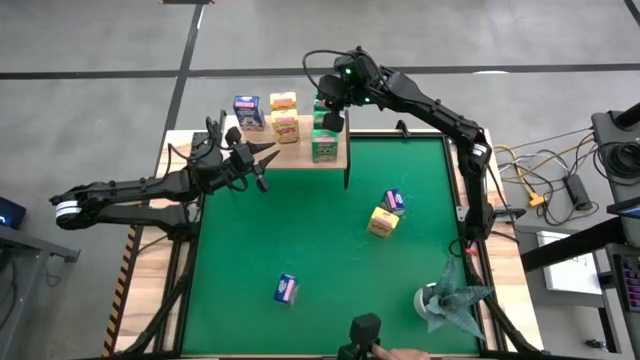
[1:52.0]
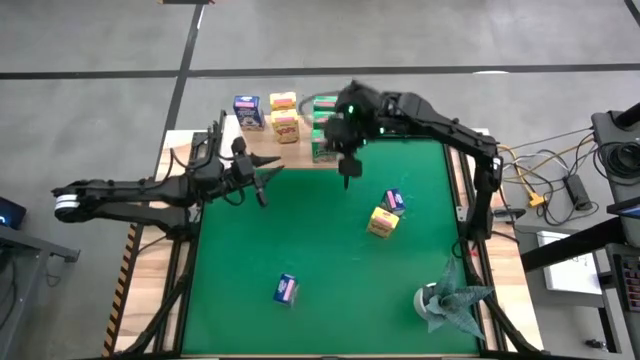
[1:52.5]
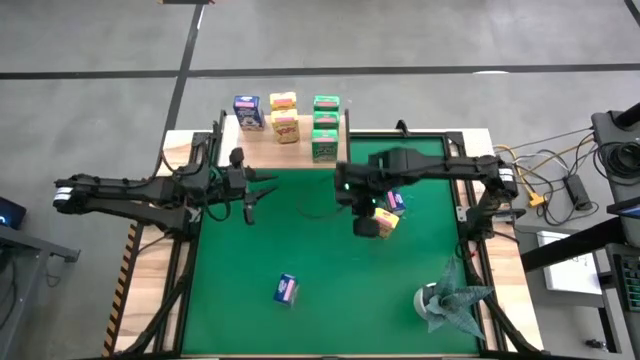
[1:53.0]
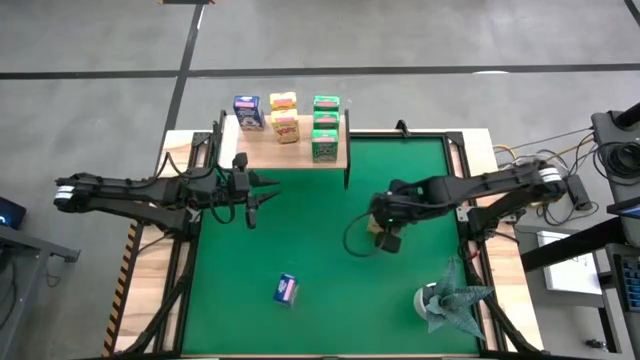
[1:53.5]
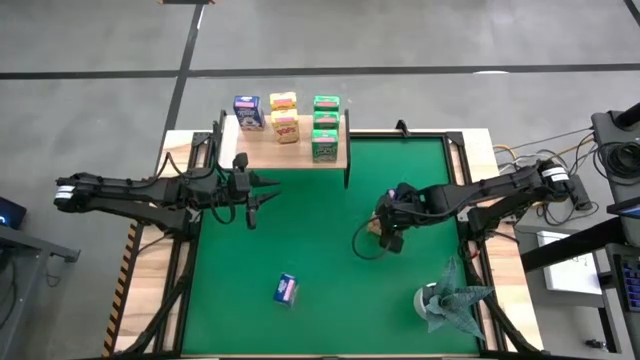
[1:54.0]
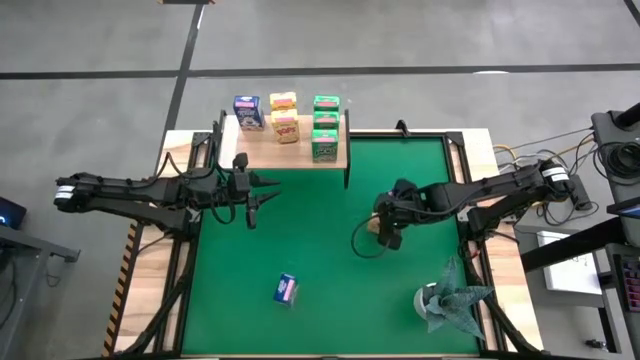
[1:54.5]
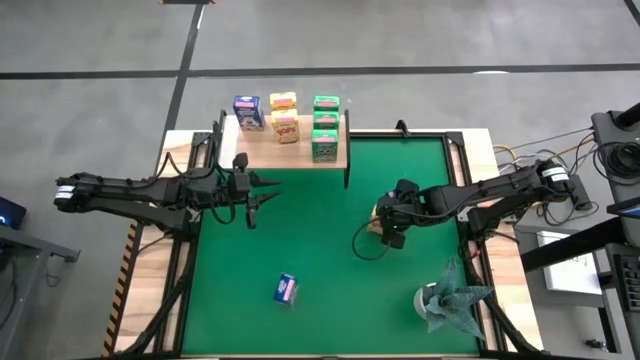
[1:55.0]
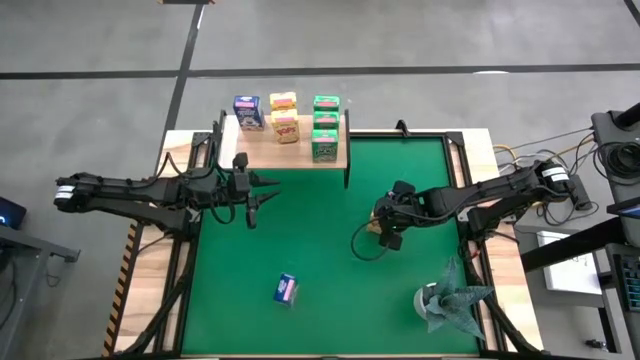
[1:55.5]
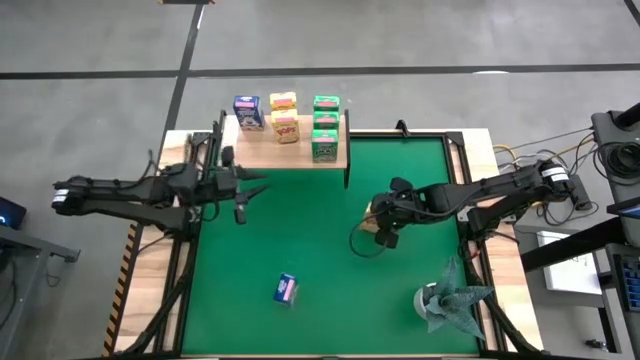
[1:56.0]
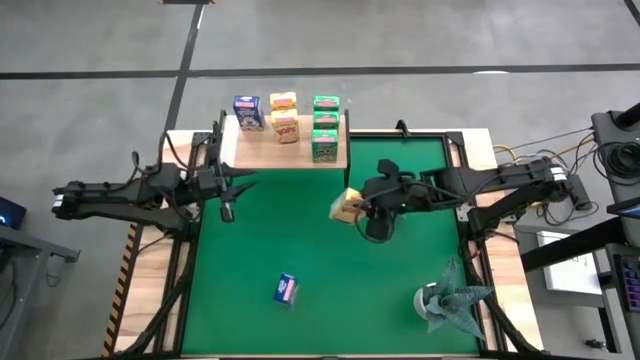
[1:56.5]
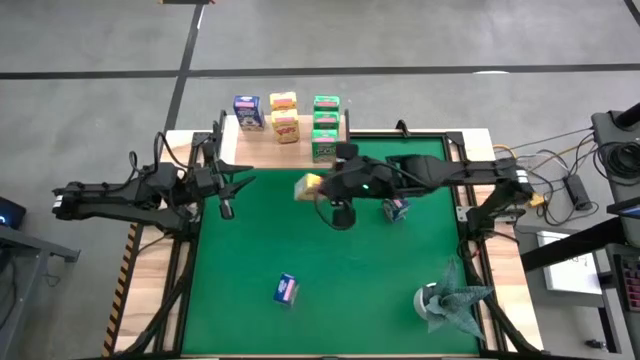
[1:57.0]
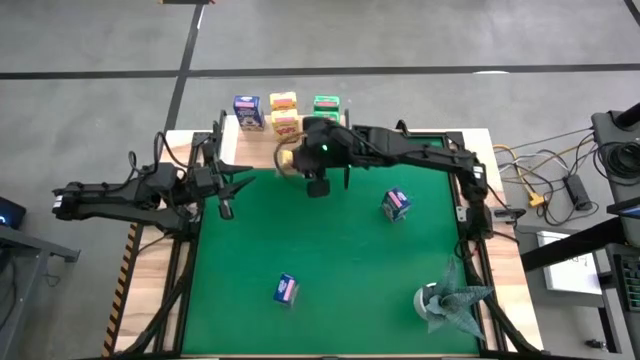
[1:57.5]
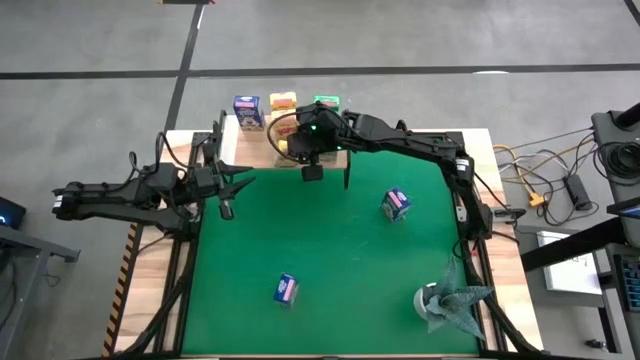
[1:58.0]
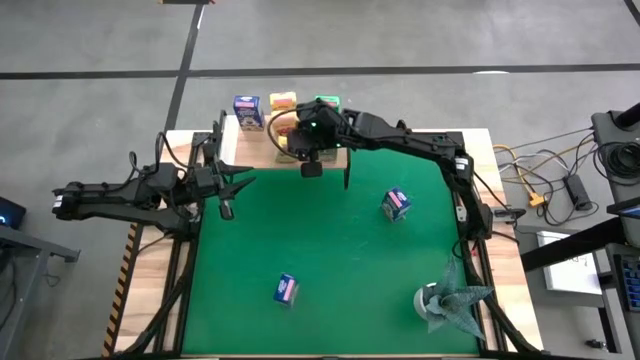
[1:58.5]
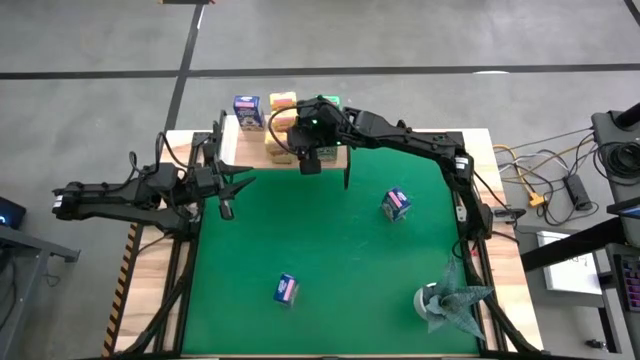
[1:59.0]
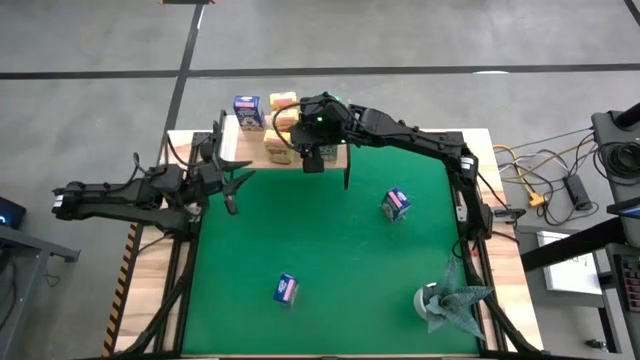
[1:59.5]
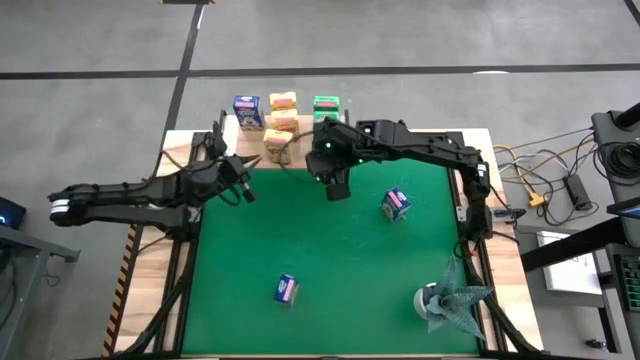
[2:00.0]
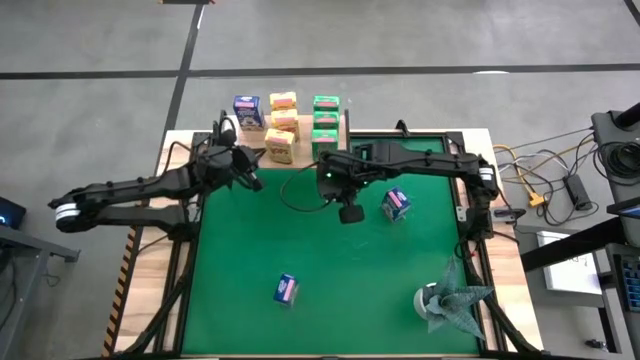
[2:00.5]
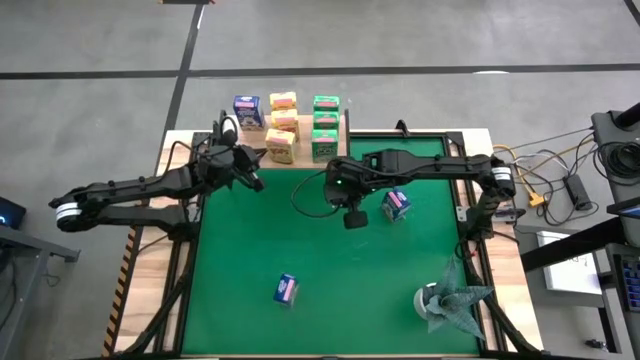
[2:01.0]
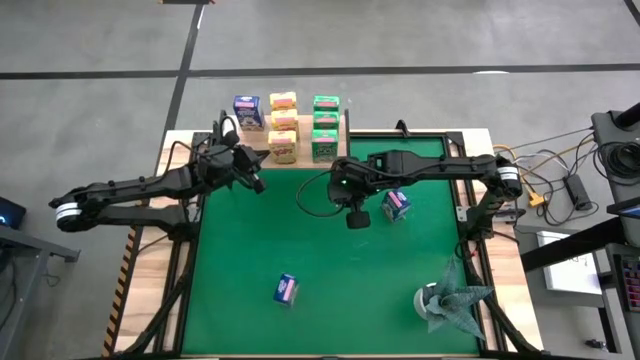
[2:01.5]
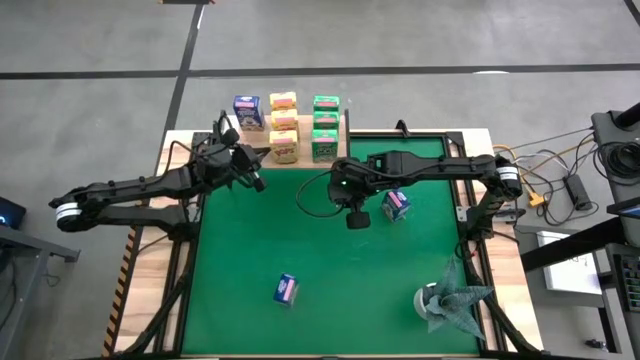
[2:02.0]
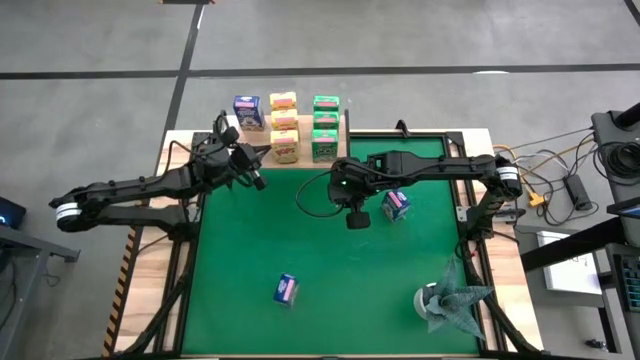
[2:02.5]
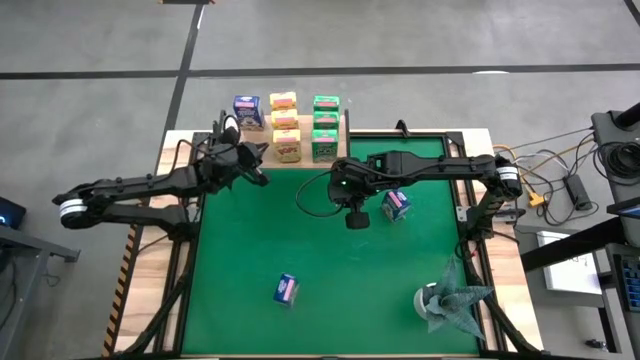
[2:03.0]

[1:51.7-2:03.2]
Task: Stack cereal on shelf
Put the yellow cereal box on the shelf aligned with the other yellow cereal box

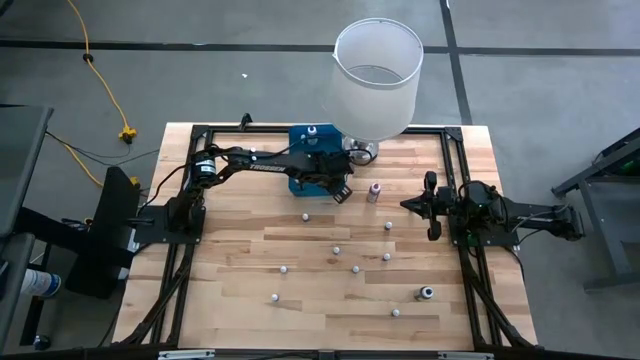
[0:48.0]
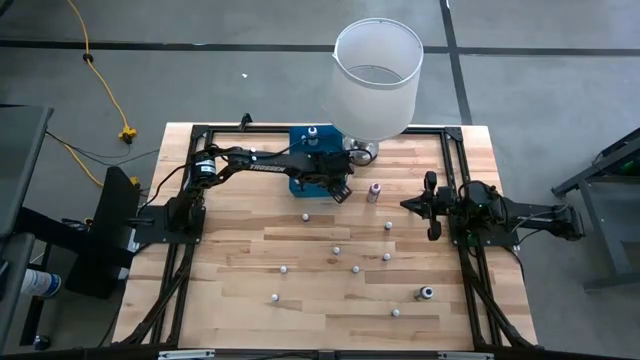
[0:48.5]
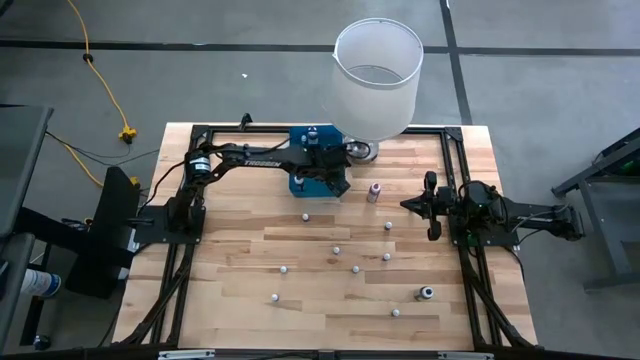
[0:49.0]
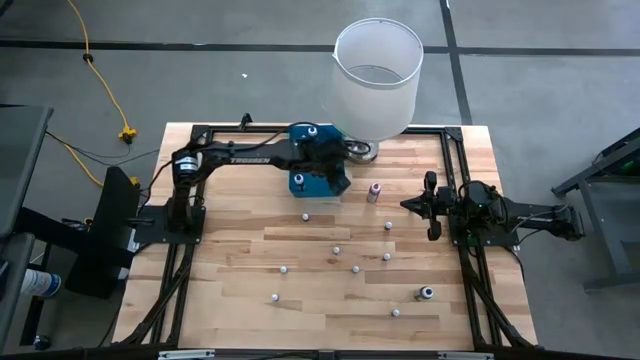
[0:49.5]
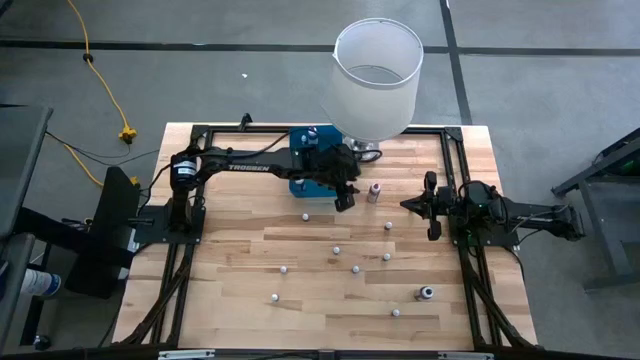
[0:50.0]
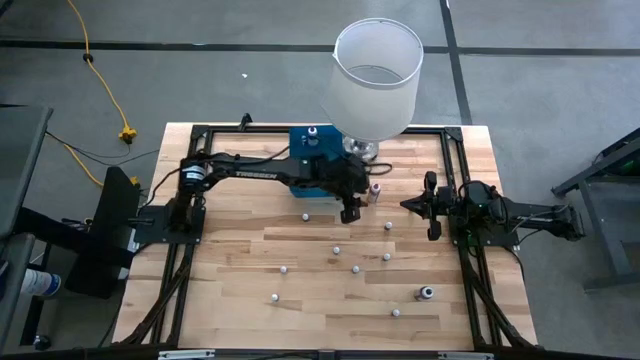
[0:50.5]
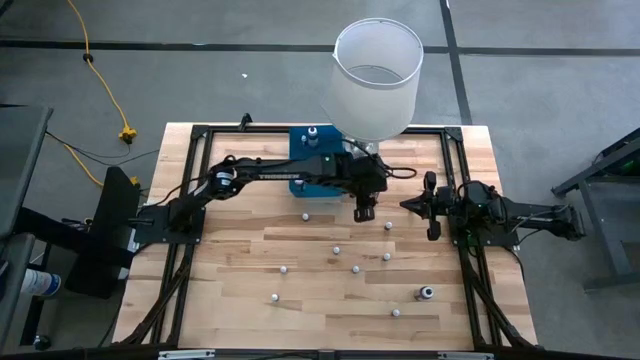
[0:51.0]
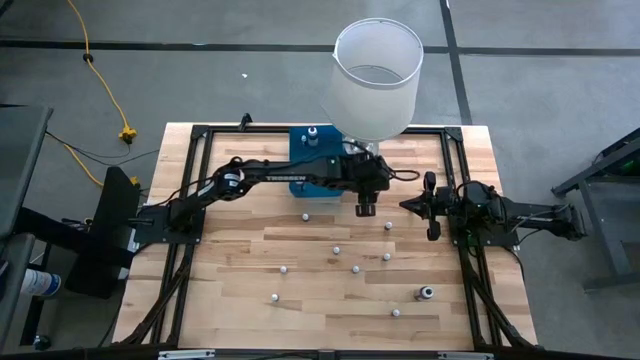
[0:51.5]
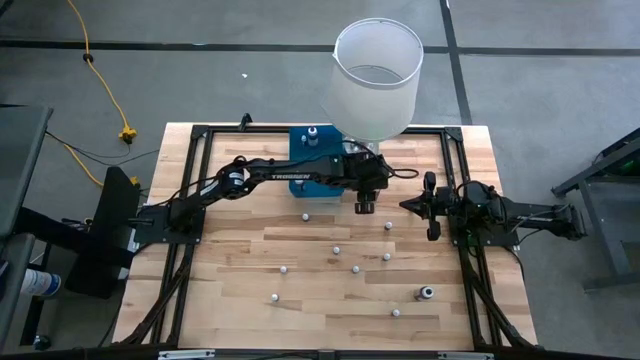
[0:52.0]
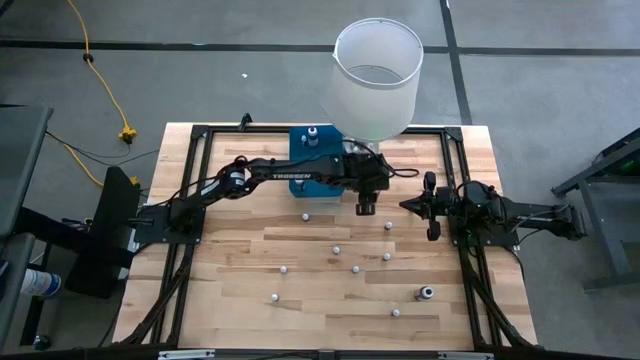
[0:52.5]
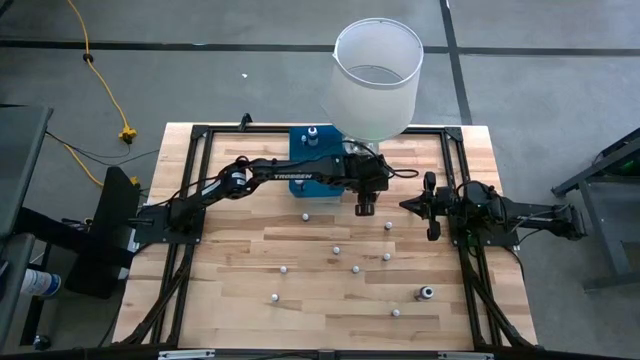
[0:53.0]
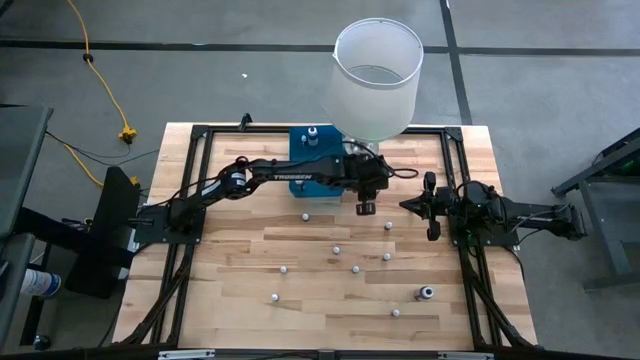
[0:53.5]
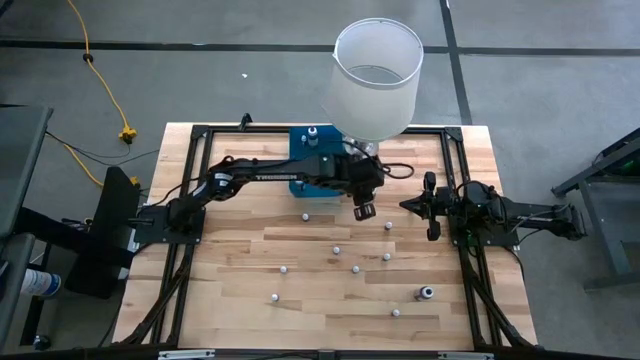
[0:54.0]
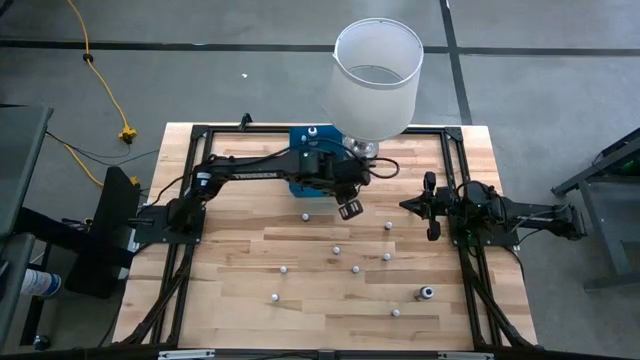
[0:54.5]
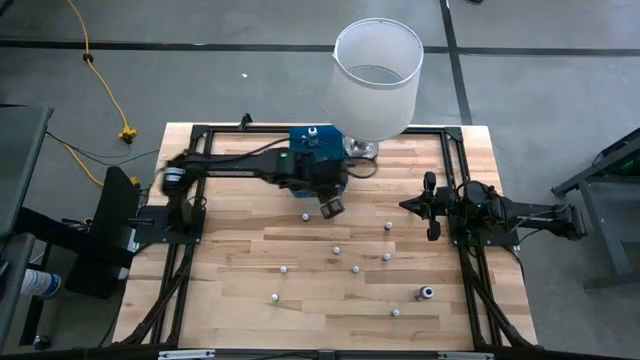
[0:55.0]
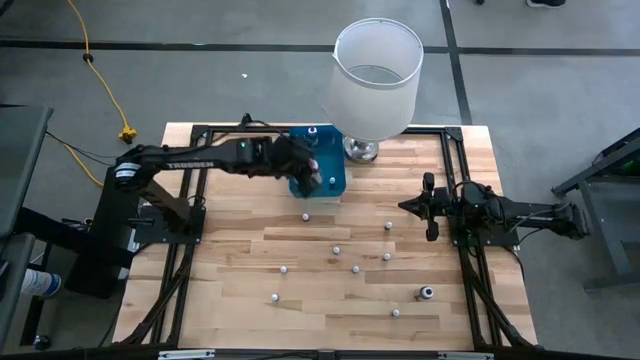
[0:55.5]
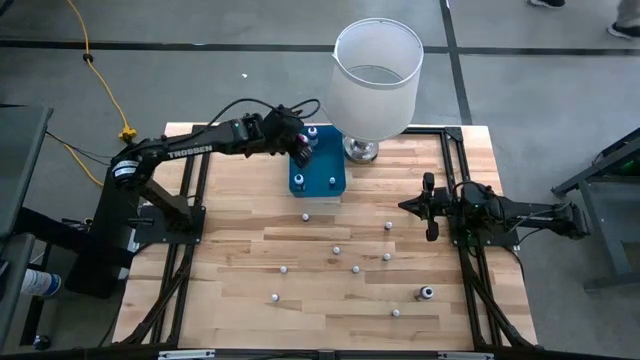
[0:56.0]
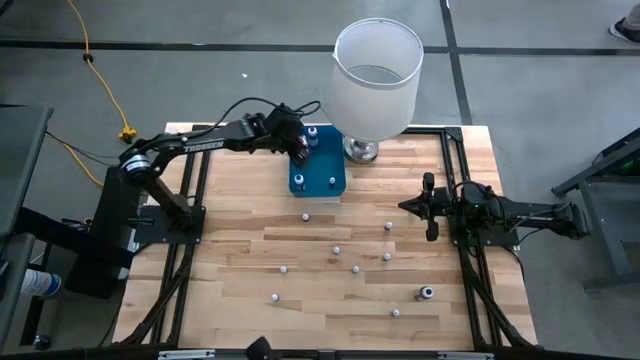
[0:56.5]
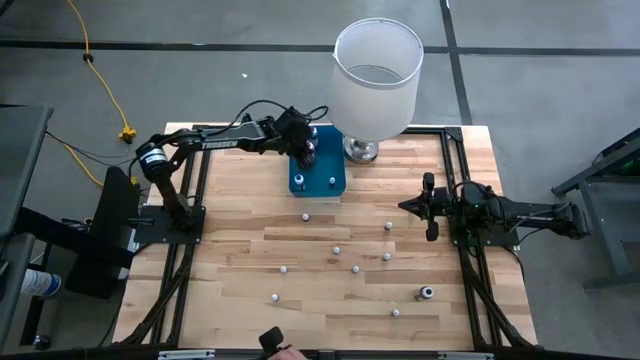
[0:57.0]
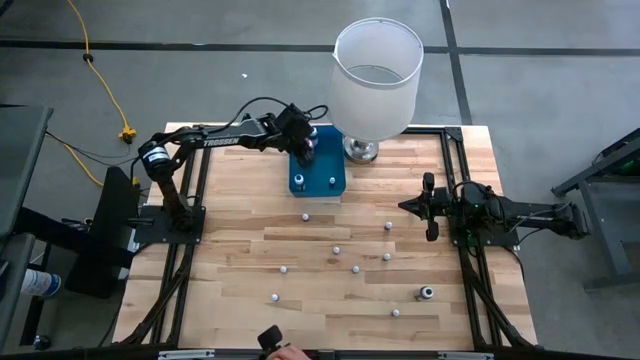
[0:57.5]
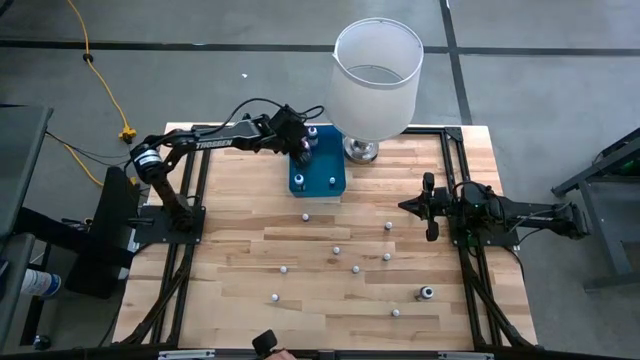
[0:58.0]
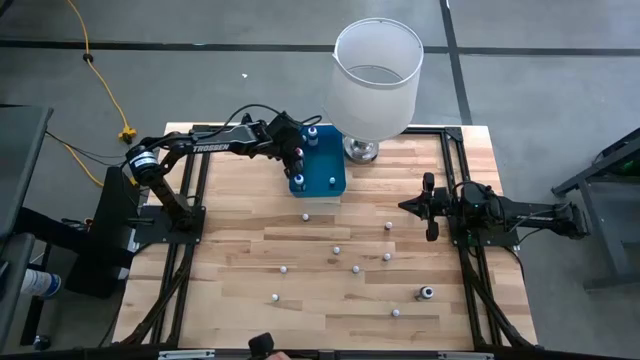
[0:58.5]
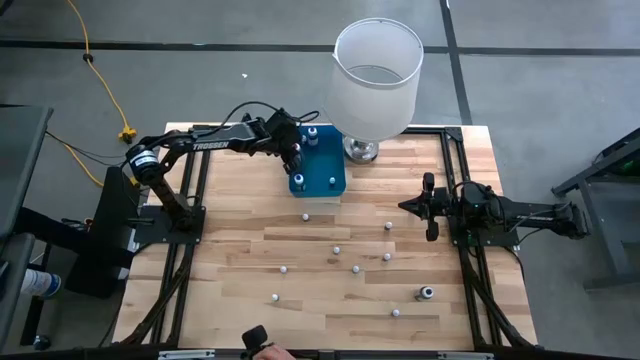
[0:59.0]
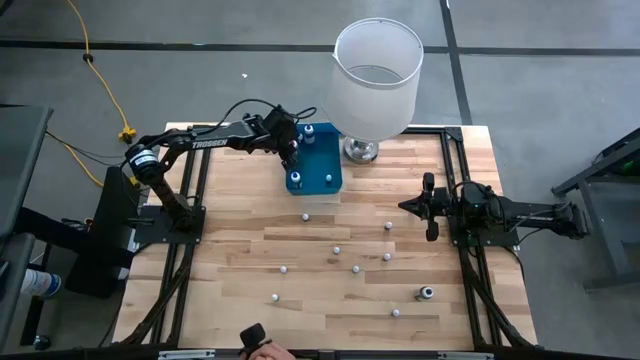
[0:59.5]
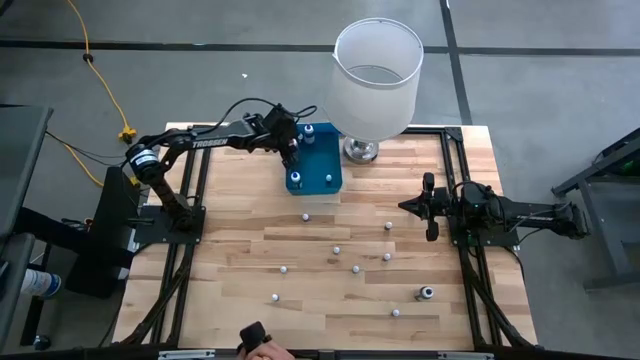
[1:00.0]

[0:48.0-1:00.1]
Task: Pick & Place food coloring
Put the big pink food coloring bottle into the blue bin
